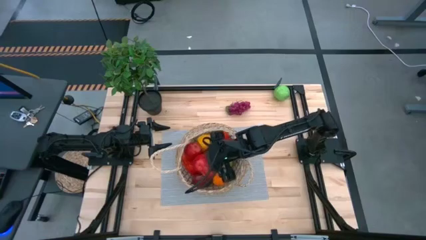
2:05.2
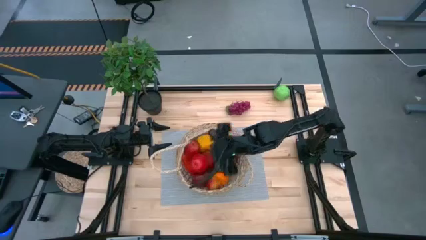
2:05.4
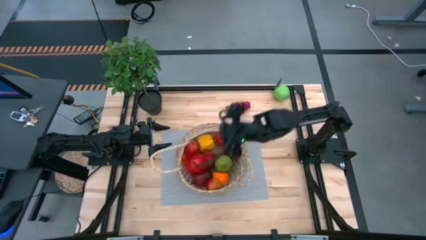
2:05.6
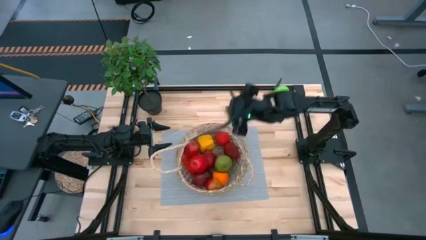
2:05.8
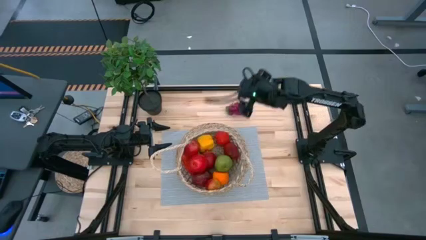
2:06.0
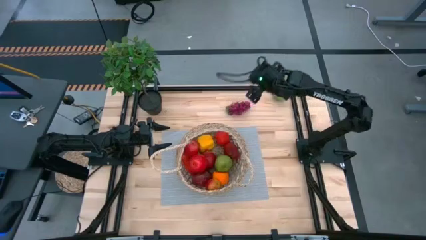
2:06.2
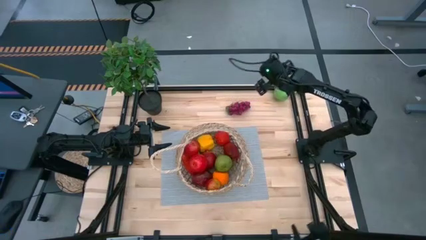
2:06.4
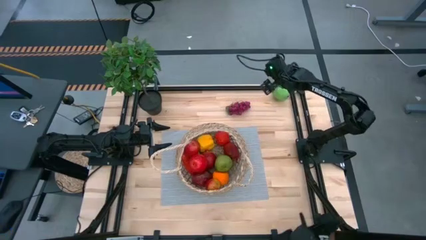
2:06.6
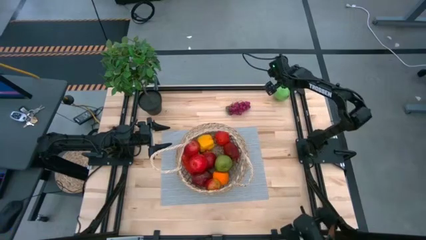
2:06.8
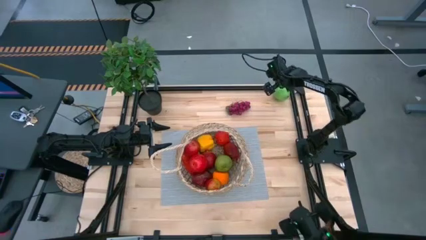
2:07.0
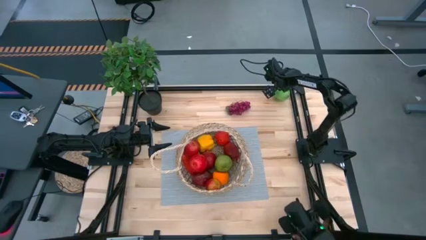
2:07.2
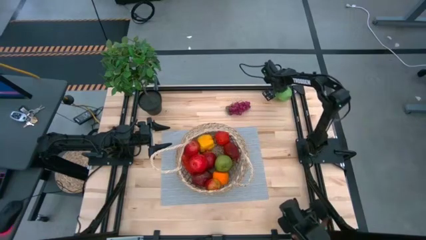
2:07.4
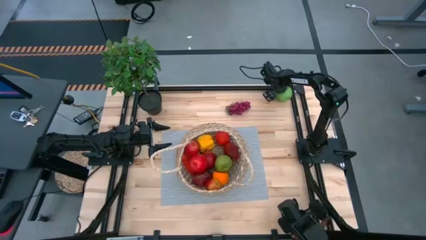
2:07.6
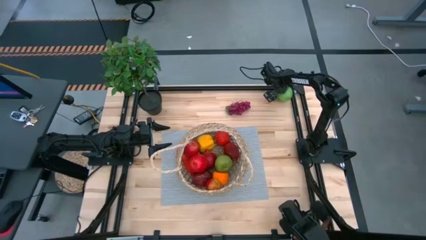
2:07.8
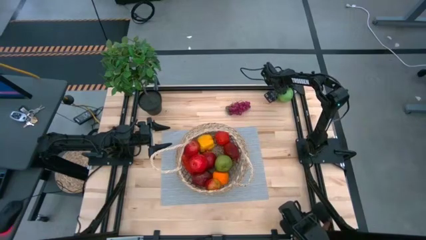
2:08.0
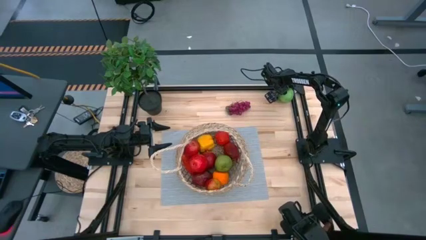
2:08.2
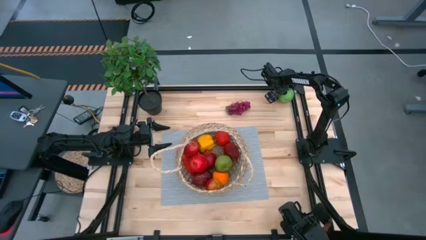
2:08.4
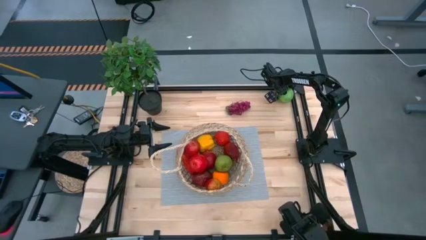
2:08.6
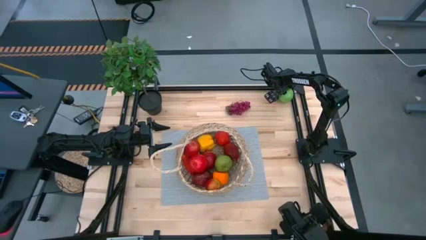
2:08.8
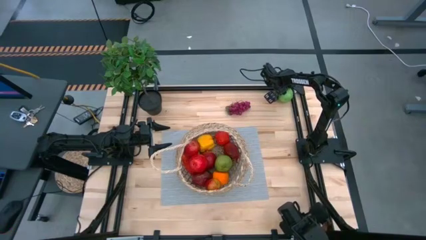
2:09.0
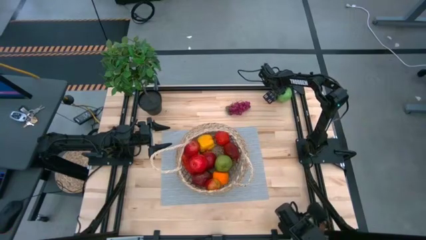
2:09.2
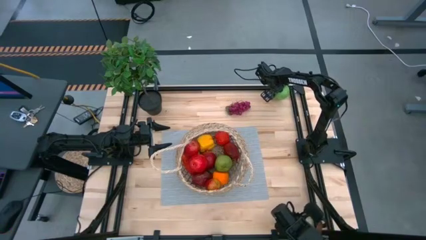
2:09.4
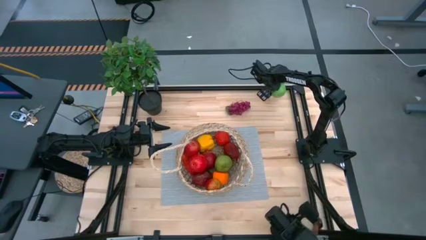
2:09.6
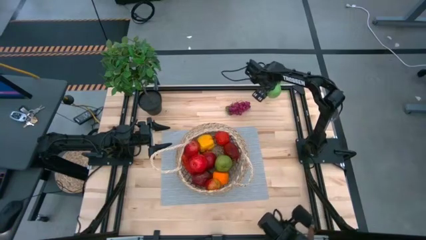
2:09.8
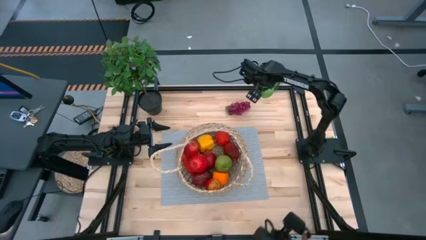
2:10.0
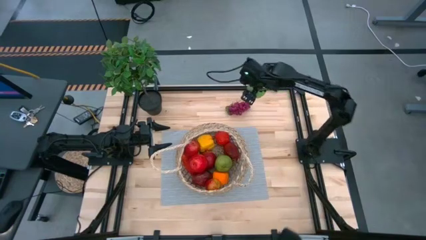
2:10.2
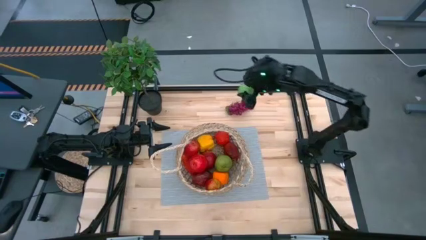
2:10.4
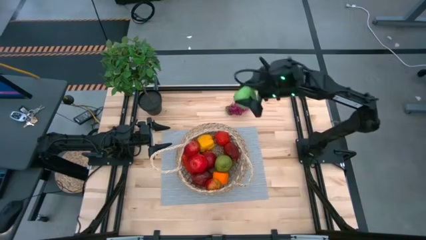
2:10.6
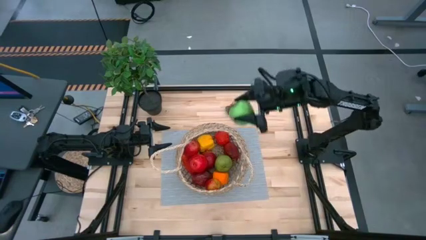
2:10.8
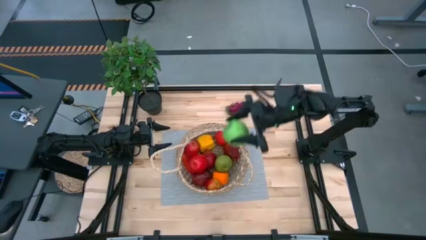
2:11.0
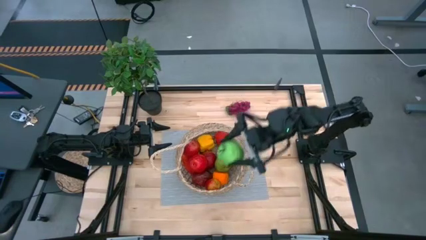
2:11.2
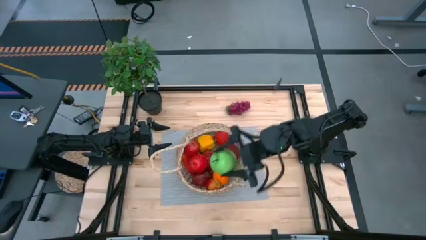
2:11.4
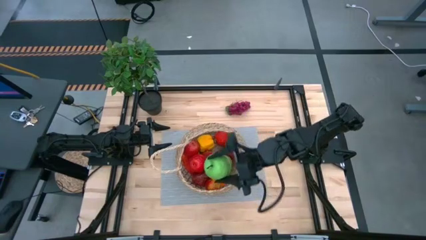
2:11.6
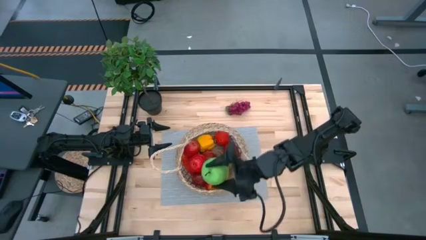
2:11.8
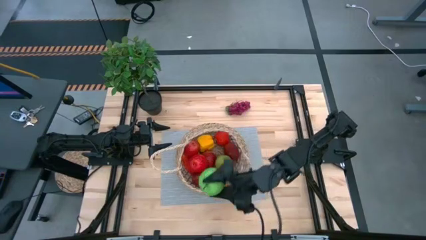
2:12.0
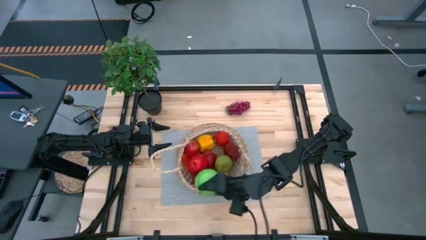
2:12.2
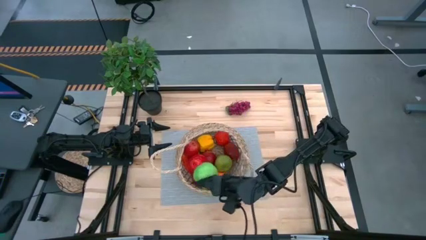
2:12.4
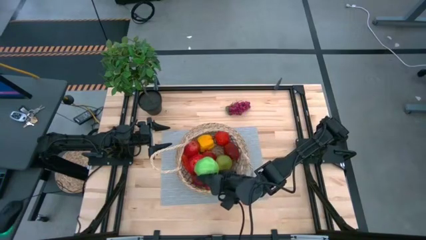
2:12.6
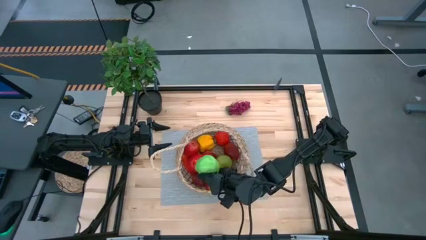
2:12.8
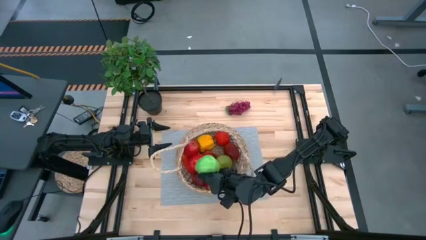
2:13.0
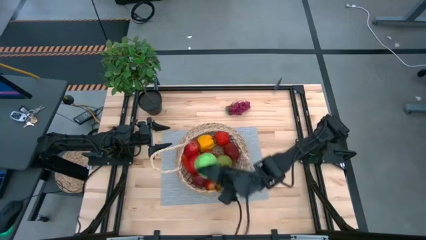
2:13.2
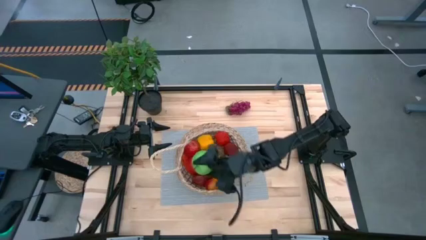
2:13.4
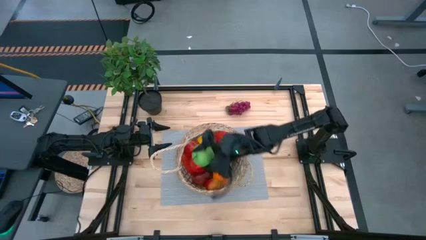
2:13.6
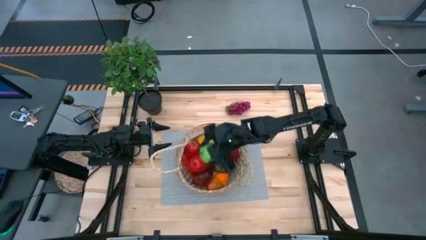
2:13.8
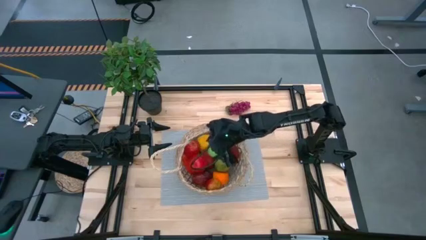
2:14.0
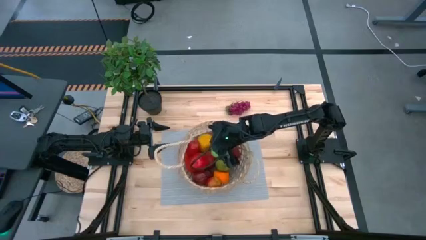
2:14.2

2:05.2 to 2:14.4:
Task: Build produce basket
Put the green apple into the basket

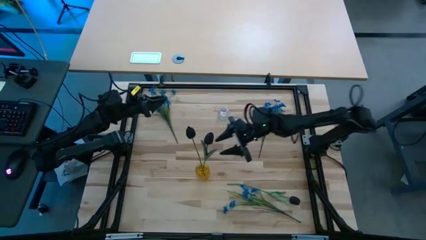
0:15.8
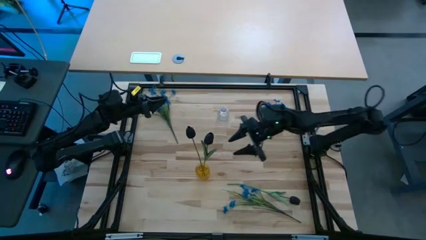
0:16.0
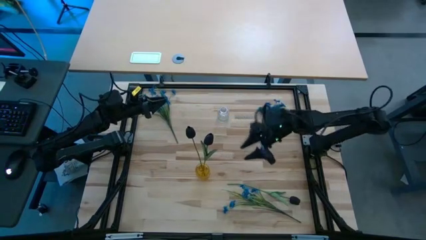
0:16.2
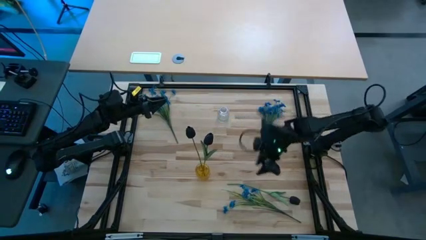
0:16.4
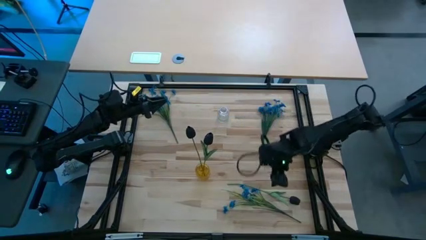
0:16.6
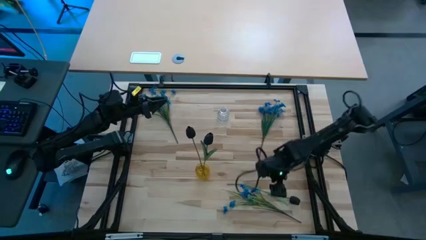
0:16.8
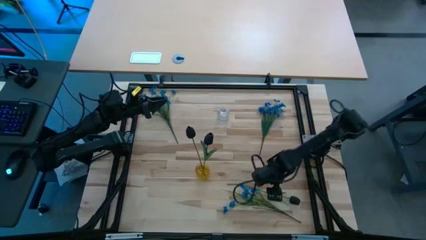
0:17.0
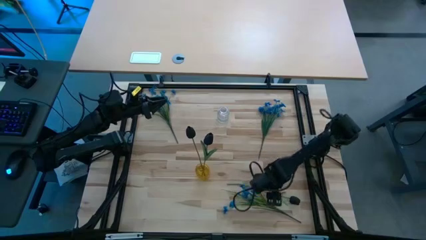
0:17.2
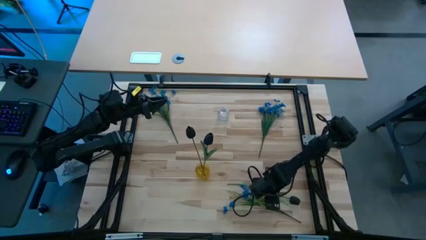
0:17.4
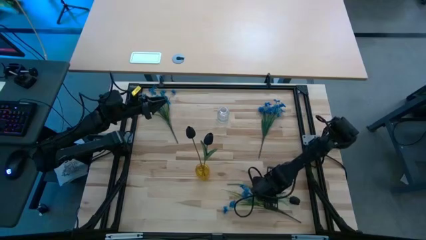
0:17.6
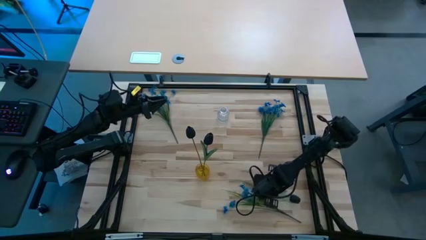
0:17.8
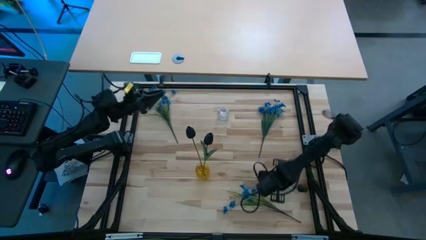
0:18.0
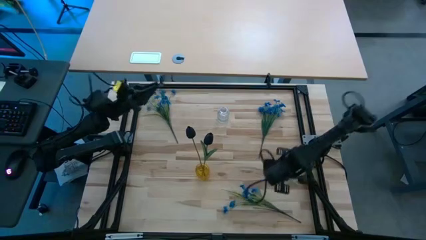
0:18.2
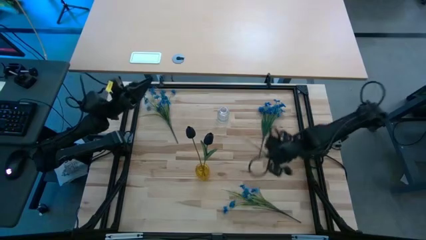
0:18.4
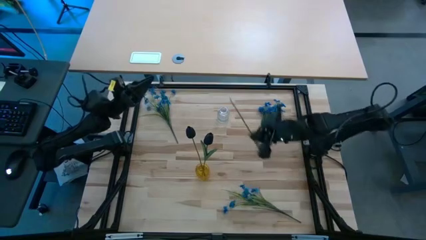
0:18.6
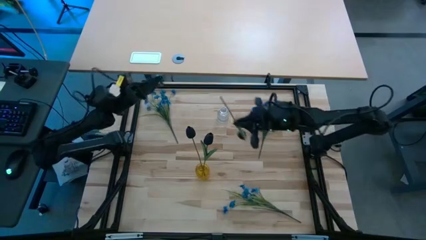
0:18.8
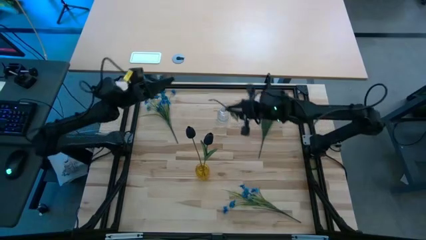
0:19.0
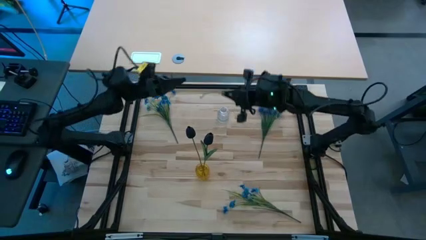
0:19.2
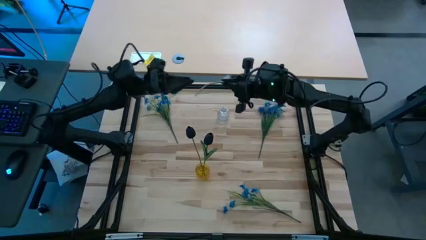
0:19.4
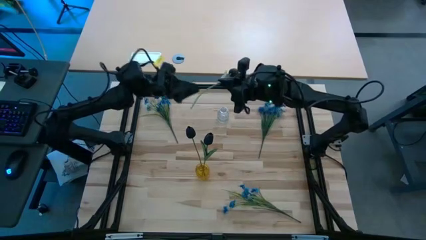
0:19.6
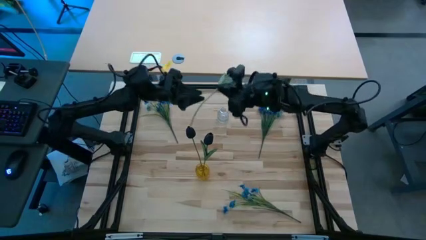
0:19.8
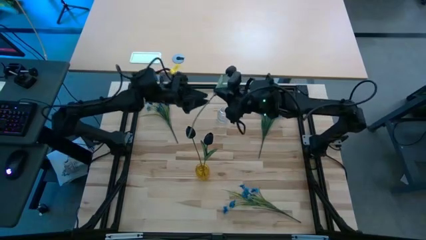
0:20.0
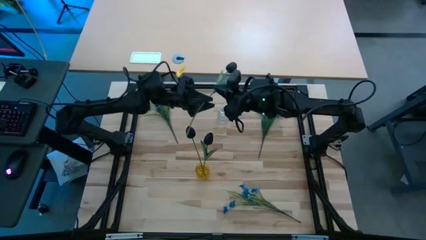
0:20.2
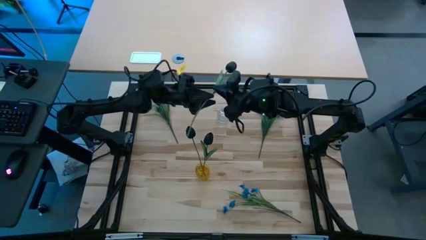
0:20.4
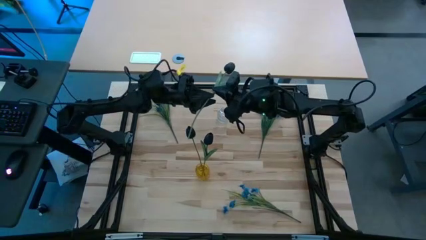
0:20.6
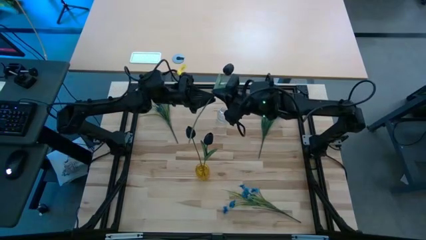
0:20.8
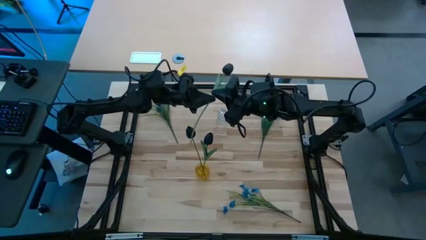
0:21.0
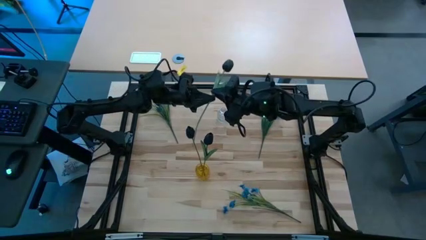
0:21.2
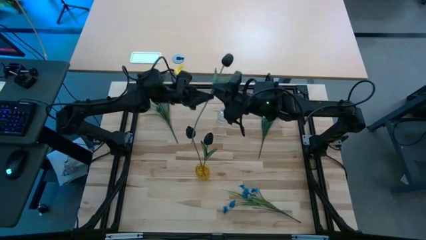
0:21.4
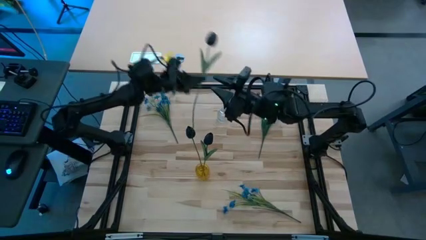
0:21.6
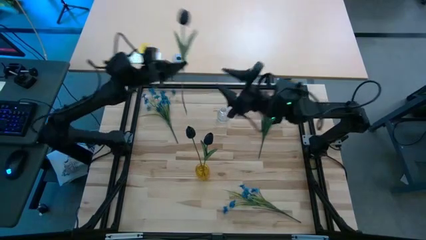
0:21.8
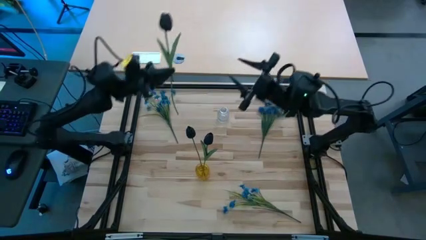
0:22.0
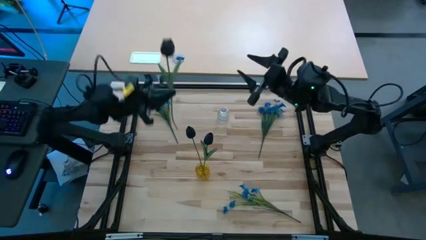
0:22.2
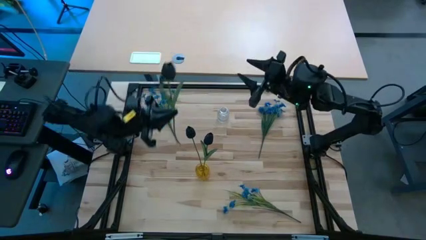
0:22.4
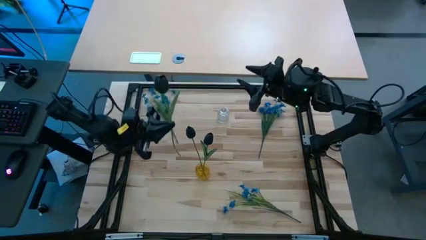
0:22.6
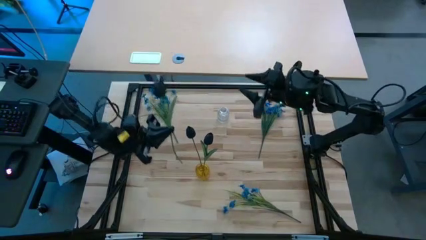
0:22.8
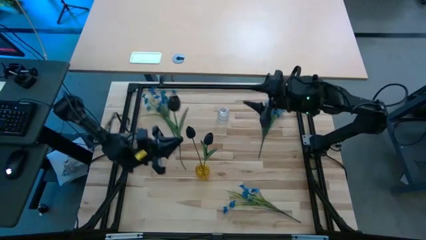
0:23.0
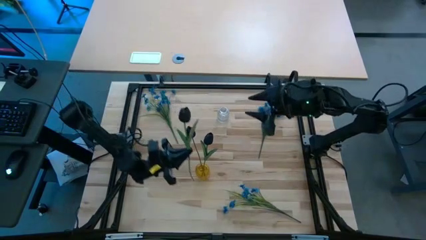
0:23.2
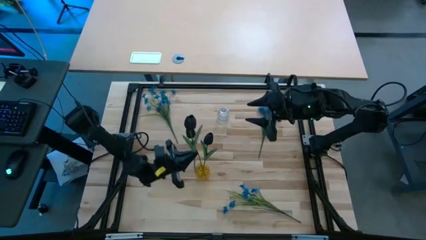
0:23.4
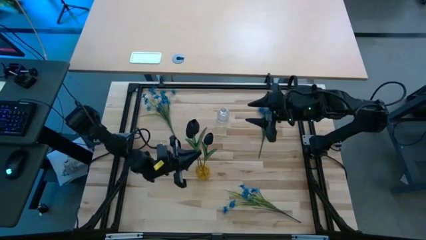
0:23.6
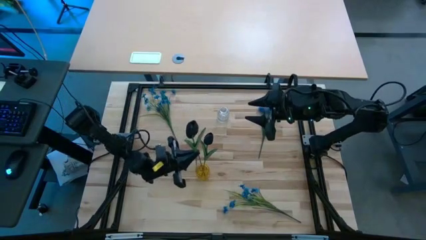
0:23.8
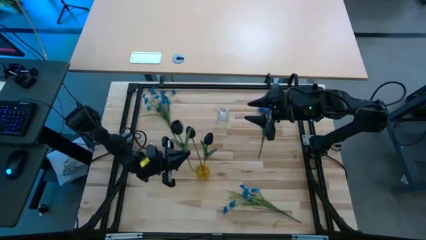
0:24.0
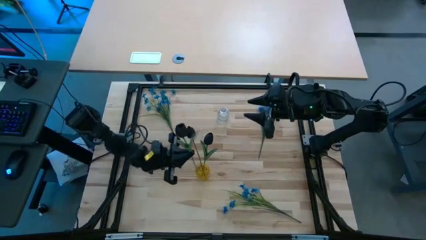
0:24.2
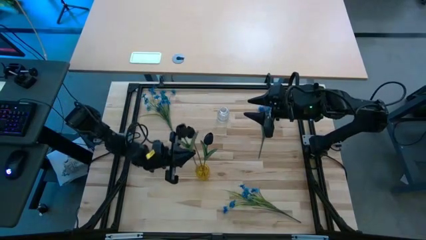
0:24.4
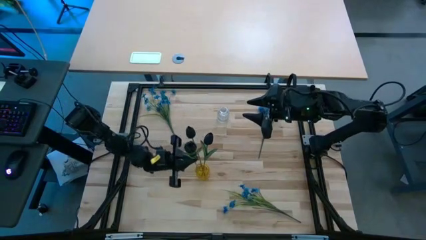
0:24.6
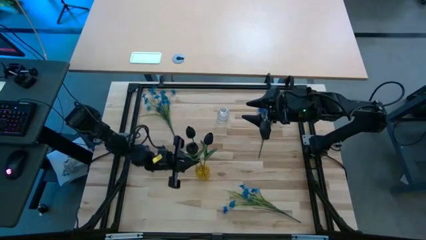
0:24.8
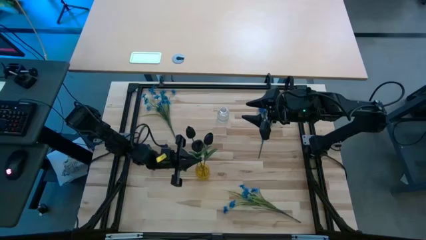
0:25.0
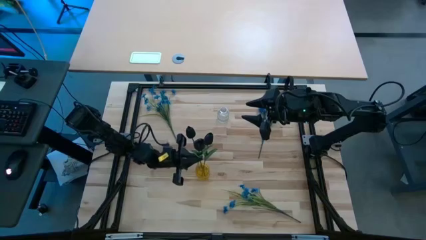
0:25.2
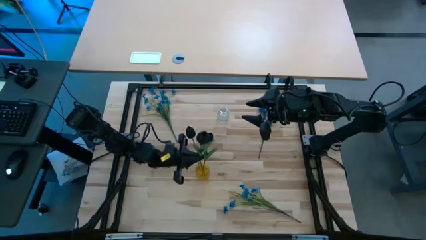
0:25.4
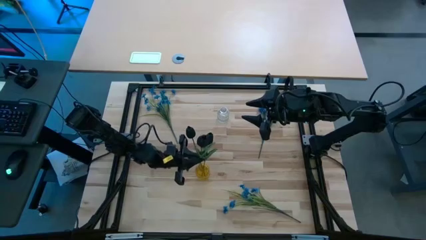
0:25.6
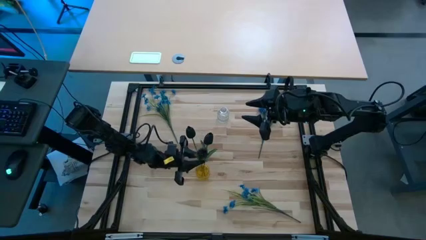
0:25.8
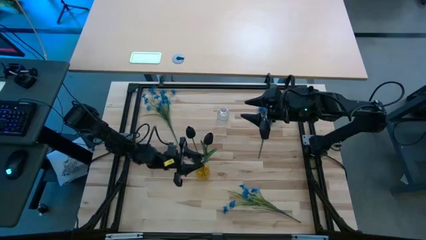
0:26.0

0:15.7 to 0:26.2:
Task: Sort flowers into vase by color
Put the black flower into the yellow vase
